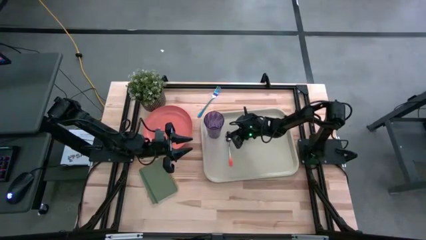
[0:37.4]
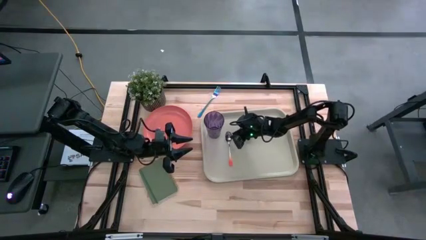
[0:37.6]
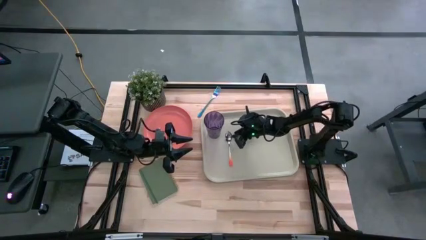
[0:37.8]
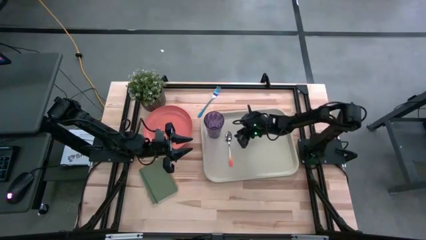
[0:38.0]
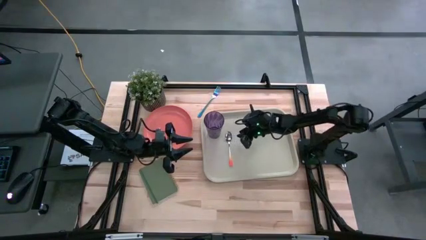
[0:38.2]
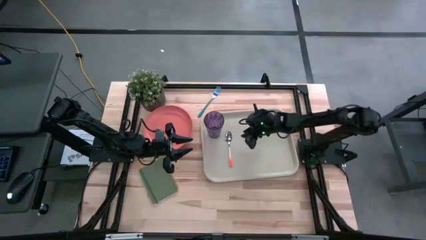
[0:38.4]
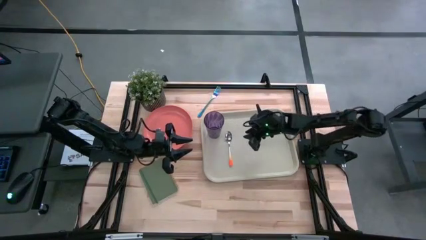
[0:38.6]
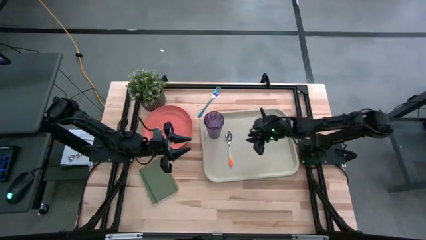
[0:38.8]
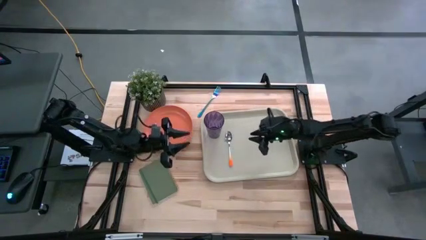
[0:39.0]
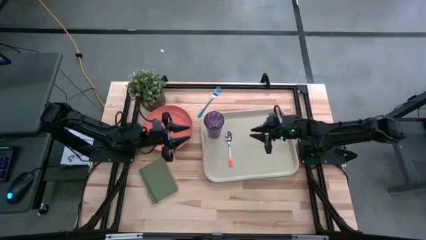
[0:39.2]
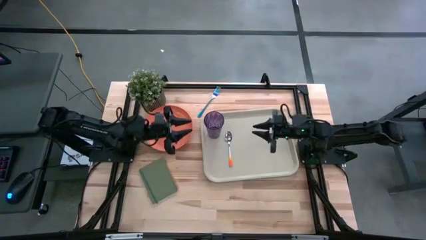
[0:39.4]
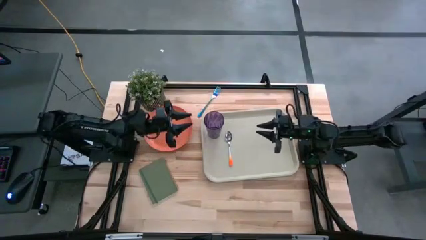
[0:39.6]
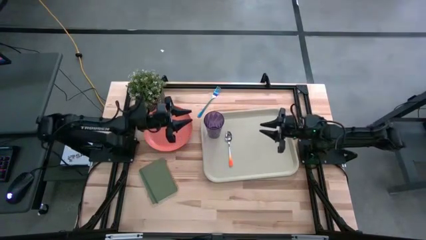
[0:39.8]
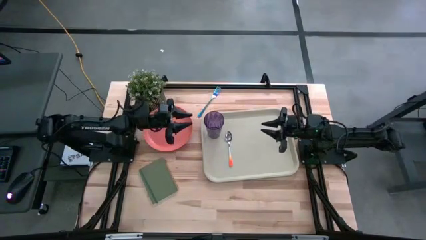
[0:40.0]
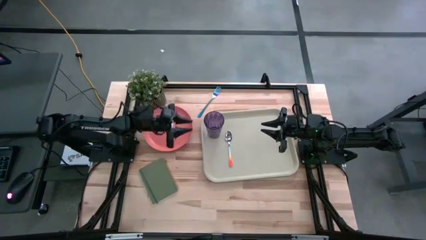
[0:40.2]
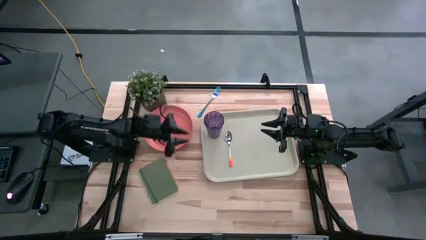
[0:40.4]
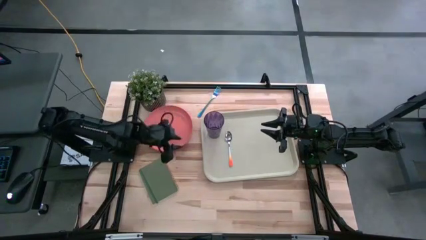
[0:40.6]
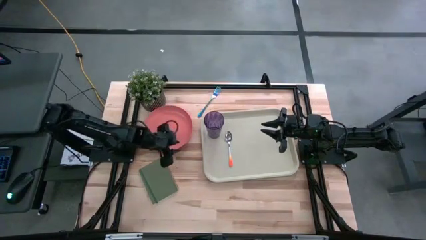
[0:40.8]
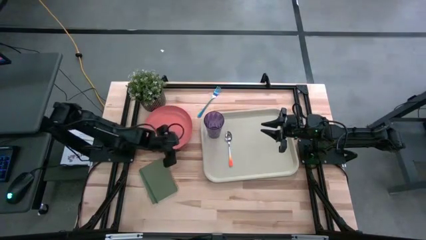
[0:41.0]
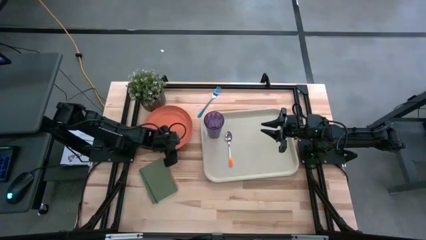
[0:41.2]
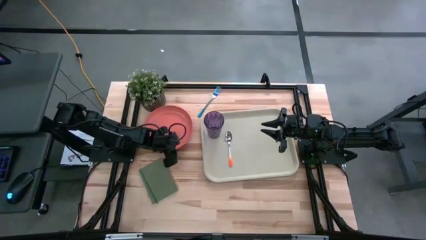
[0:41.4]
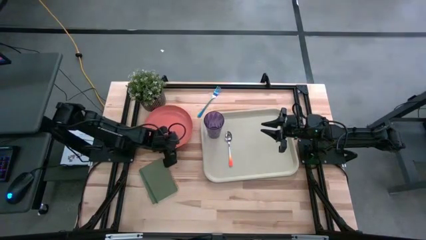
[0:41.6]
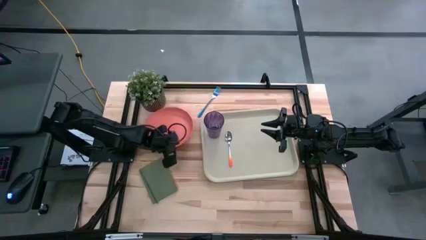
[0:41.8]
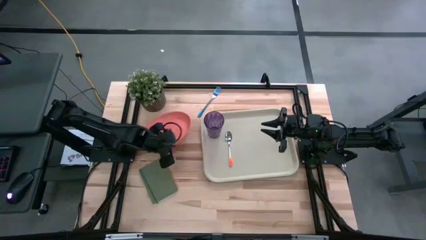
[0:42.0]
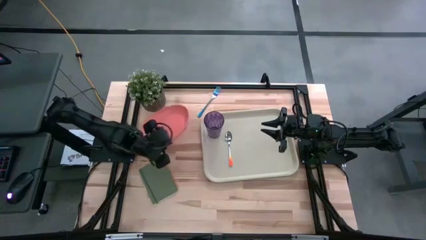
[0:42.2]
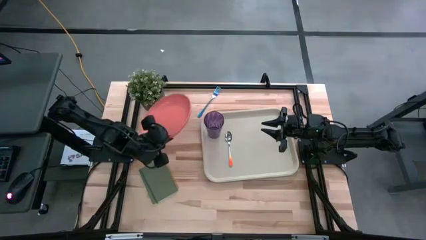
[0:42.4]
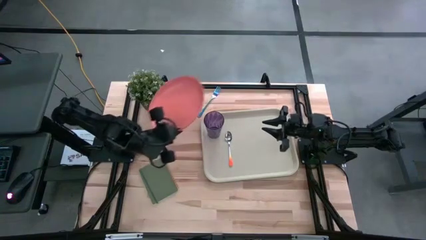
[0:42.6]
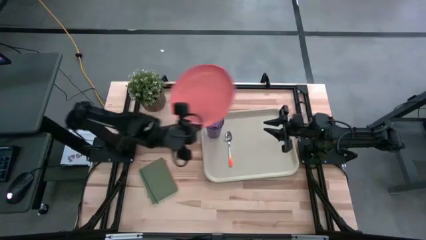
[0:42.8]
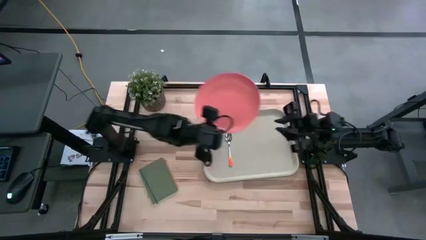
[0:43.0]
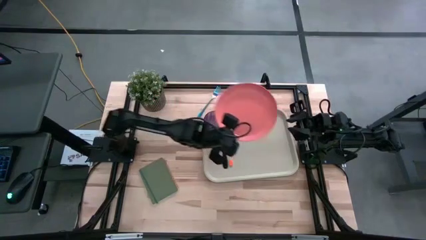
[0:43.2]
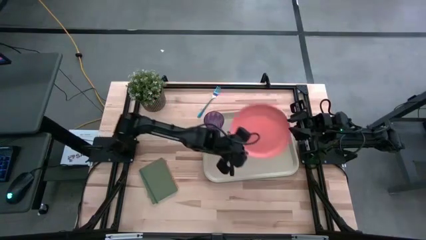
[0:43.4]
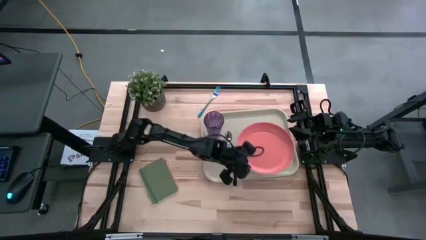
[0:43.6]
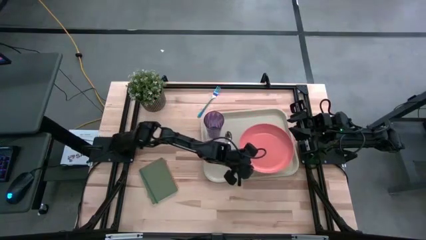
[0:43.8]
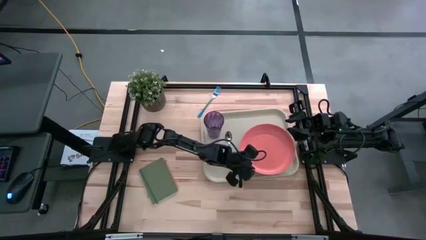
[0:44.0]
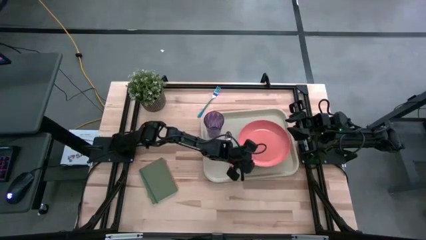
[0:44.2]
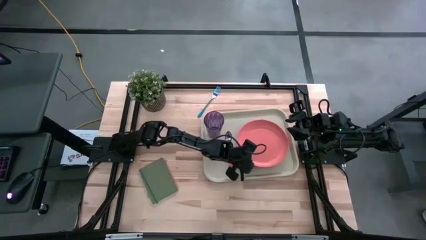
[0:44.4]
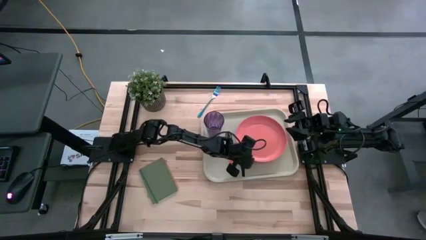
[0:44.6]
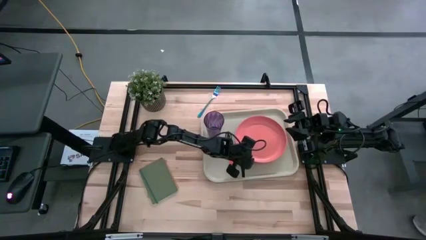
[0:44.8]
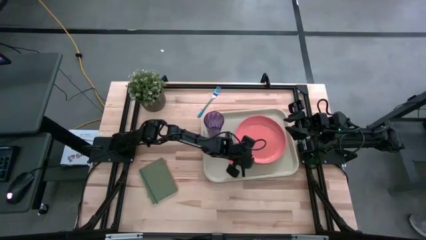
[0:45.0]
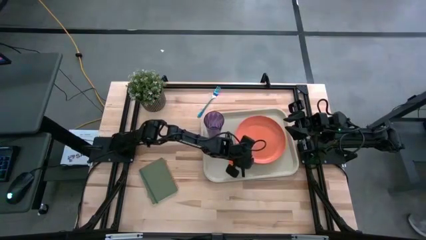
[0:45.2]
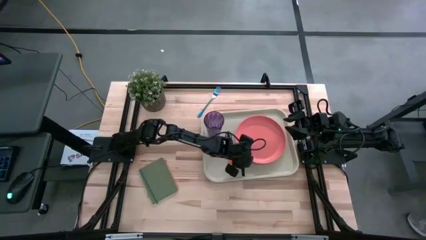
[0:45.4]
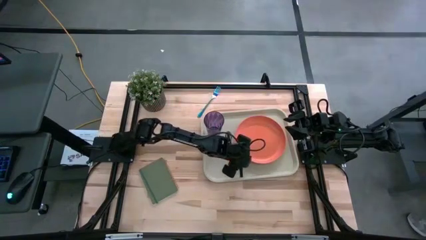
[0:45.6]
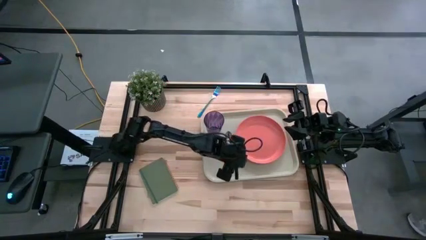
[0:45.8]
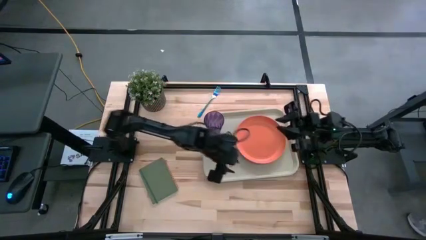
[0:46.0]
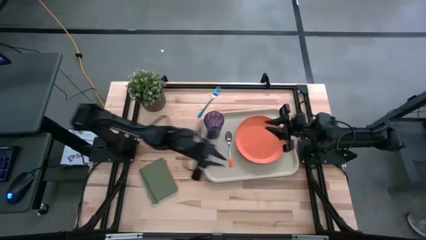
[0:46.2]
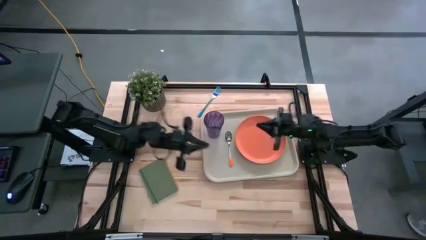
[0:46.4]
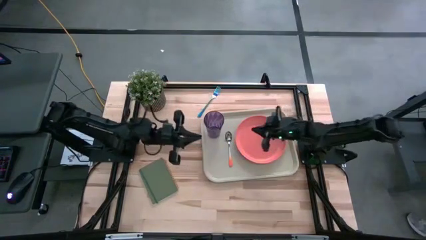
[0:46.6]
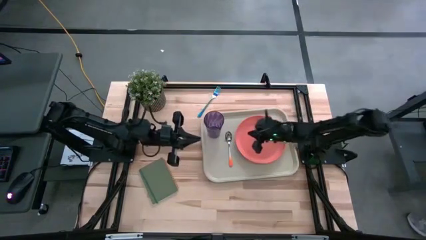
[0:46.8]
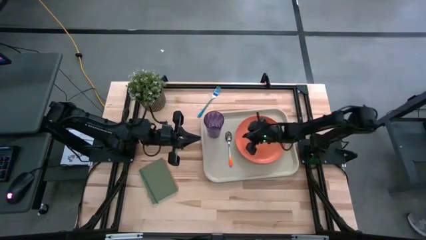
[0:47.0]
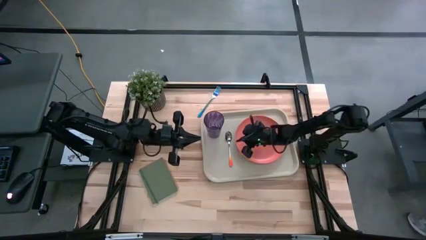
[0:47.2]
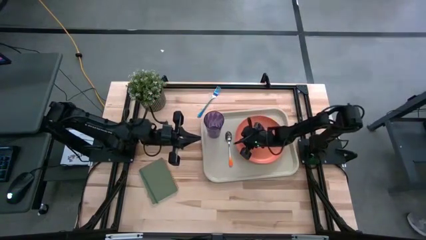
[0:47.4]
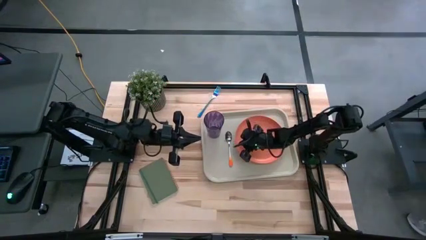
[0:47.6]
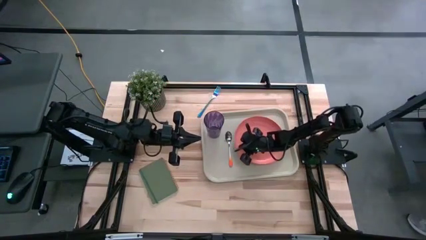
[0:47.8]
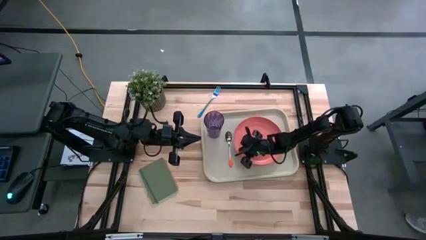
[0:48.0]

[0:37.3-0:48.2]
Task: Pick and place plate/cup/fork/spoon on tray
Put the orange plate on the gray serving tray to the right of the orange spoon

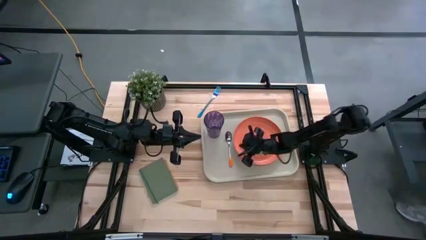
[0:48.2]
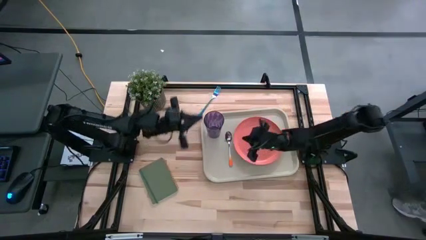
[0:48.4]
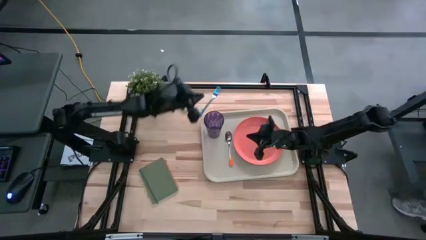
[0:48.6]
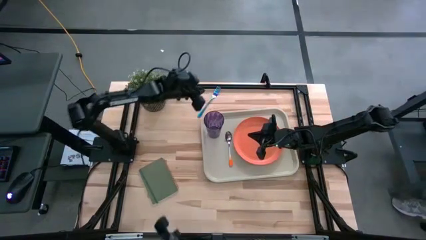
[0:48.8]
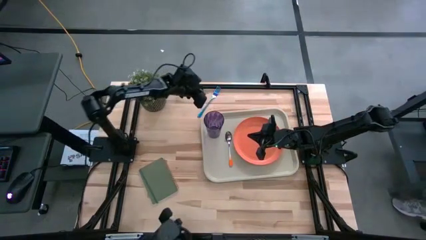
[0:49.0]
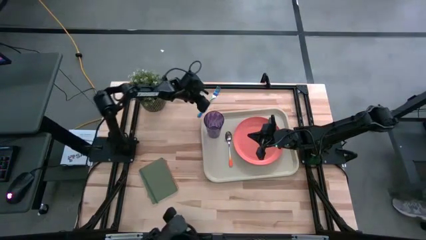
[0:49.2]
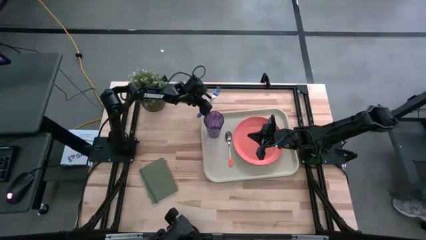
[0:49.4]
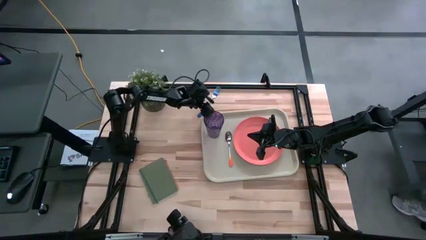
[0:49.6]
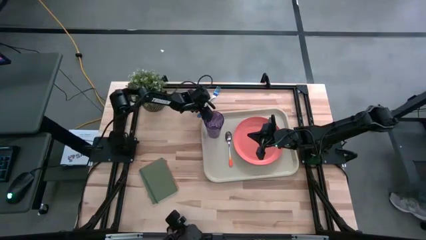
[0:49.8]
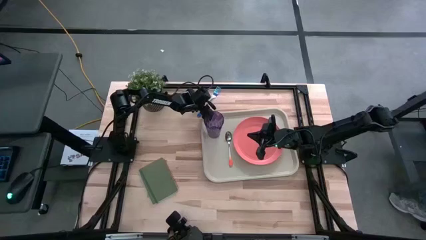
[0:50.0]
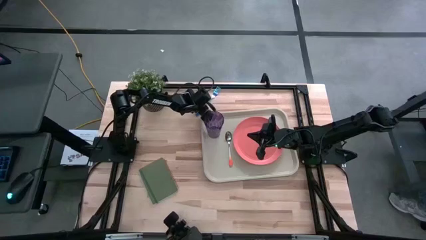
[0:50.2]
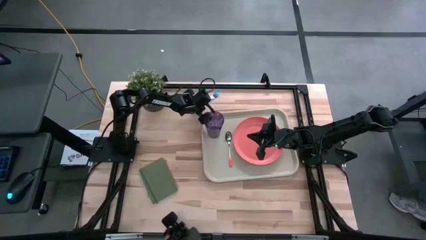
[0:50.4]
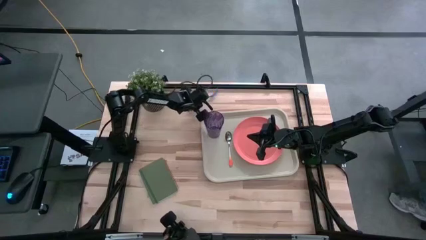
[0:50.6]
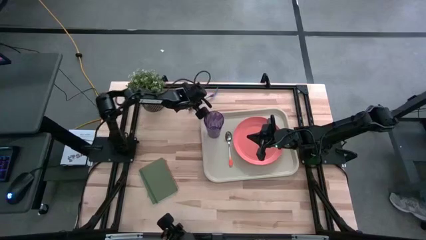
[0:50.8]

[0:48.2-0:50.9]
Put the blue fork on the gray serving tray to the left of the orange spoon

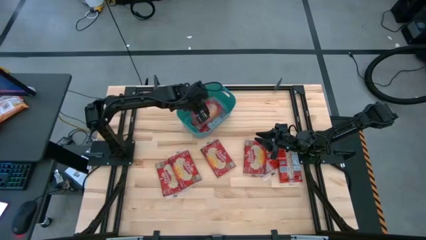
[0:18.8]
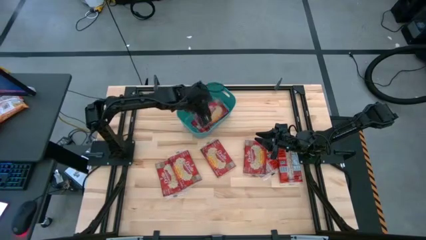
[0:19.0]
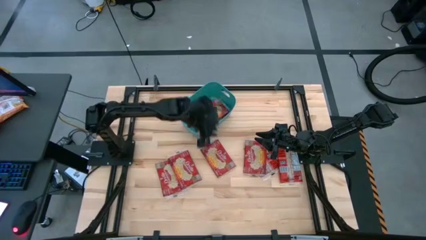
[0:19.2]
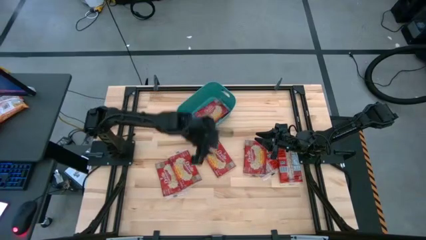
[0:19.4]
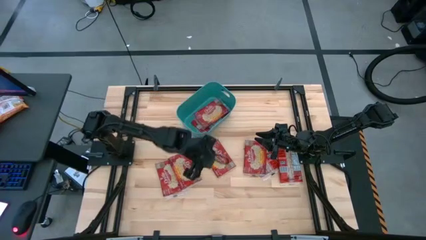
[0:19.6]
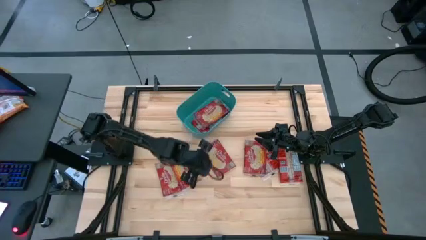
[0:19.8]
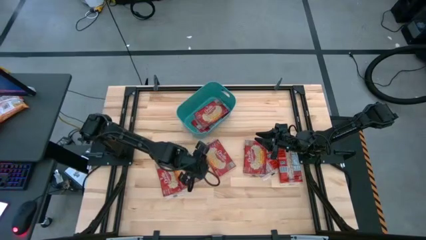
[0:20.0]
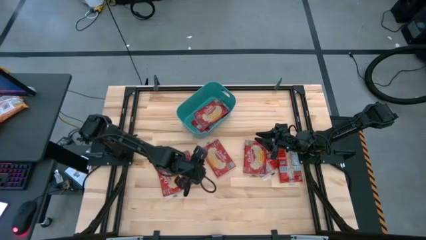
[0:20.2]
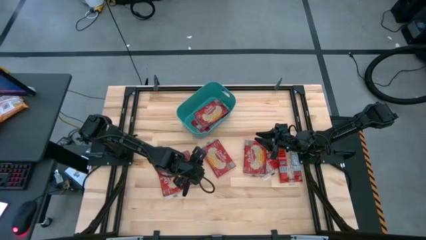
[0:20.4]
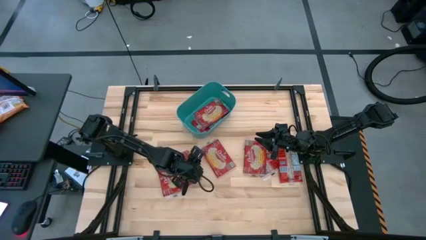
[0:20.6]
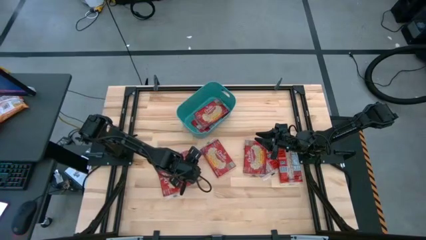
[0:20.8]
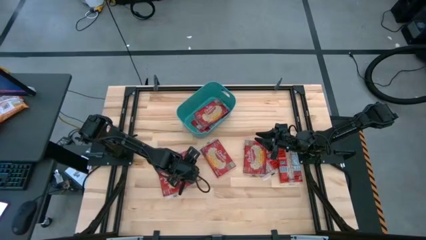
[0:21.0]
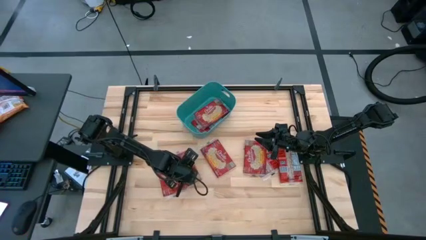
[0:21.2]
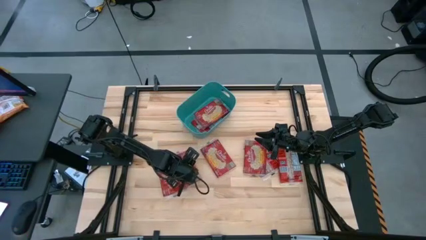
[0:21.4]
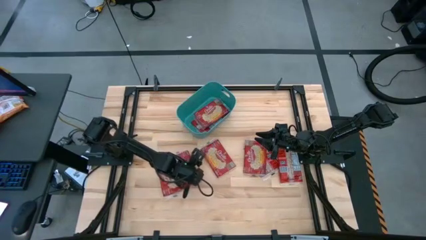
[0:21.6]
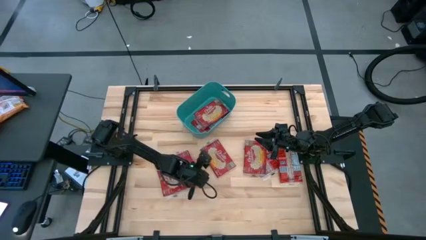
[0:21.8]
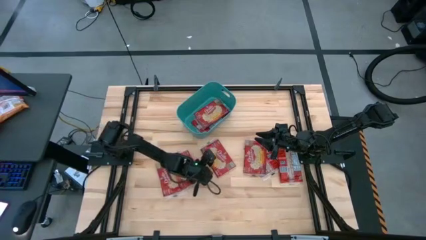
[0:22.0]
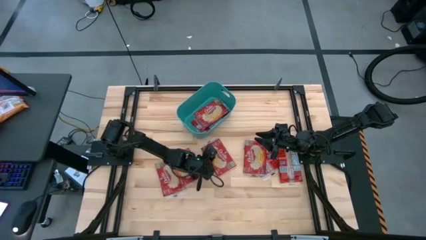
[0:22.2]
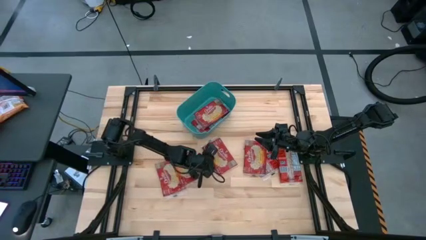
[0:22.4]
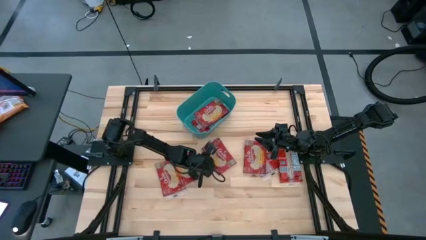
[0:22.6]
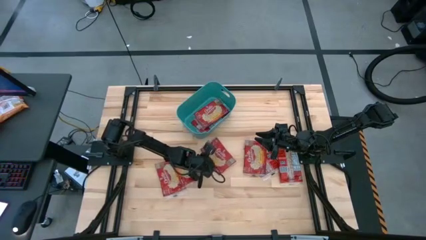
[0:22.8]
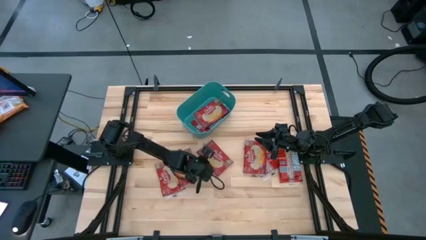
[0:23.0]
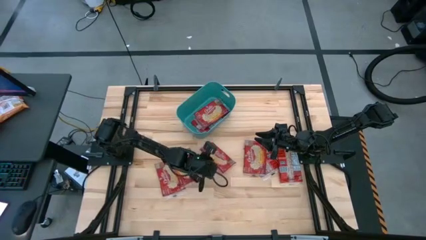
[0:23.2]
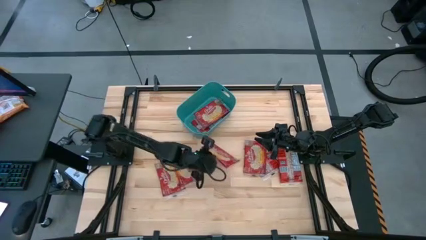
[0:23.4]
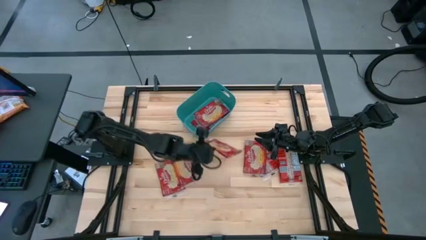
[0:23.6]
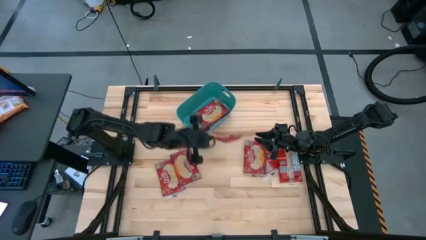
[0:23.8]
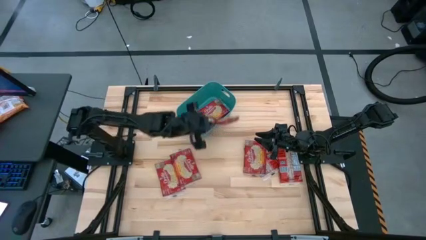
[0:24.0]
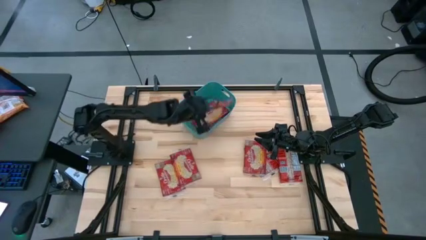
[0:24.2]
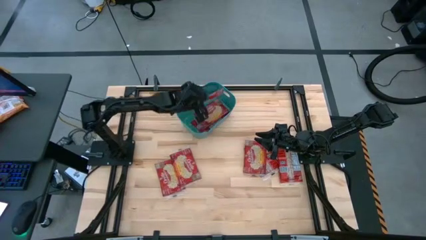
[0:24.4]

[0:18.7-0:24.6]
Task: Sort popcorn bags into baskets
Put the red popcorn bag into the green container
